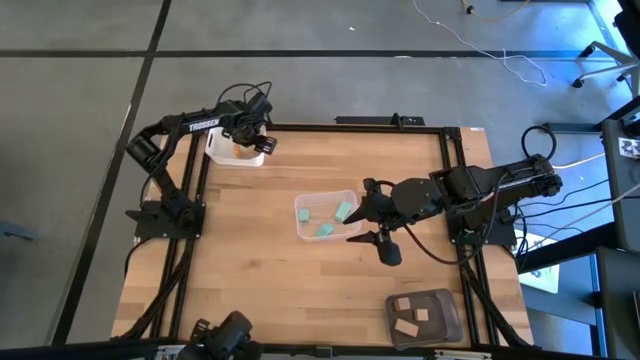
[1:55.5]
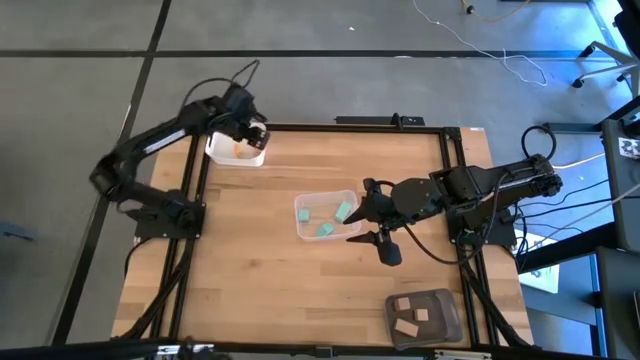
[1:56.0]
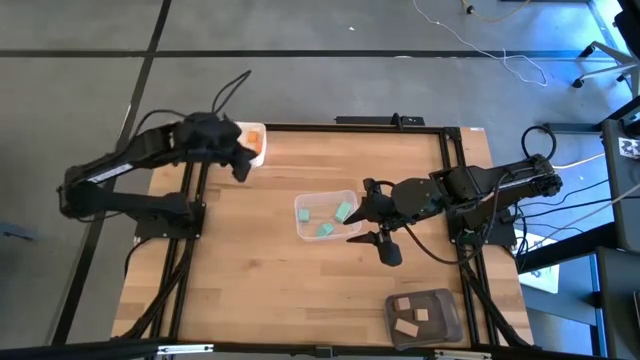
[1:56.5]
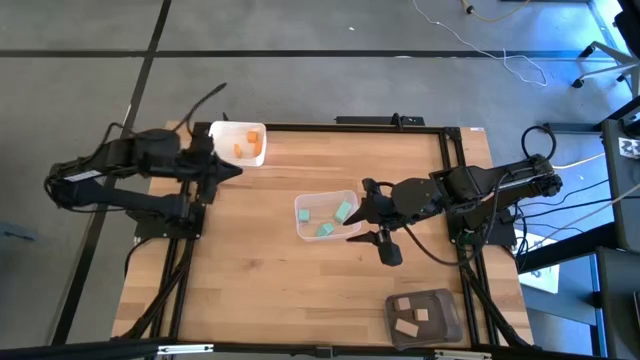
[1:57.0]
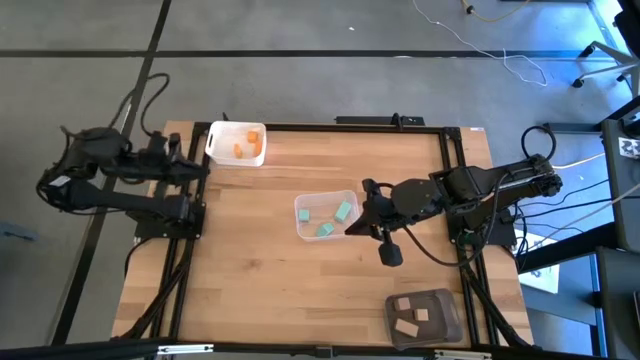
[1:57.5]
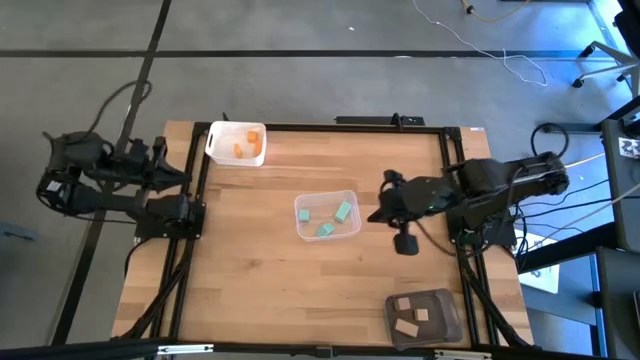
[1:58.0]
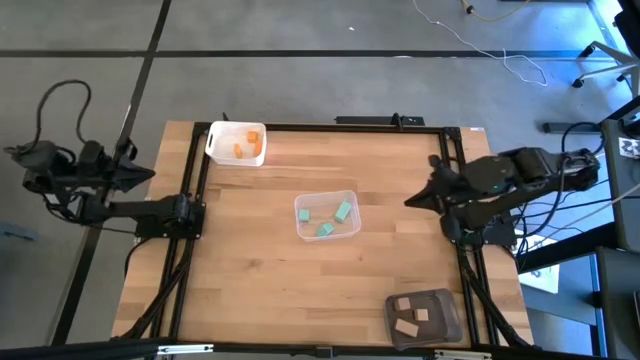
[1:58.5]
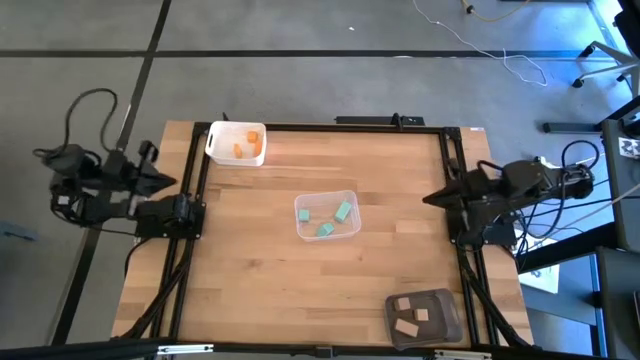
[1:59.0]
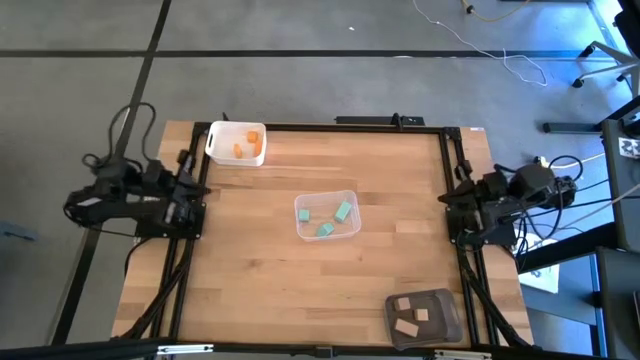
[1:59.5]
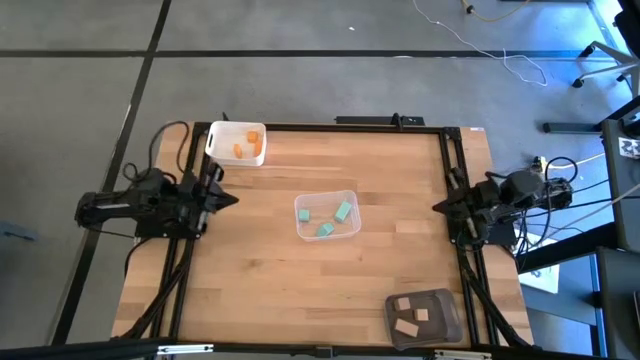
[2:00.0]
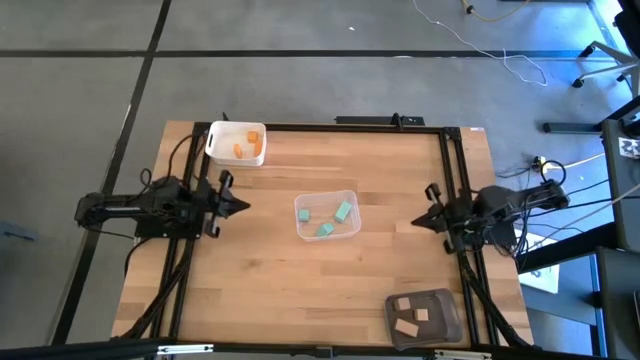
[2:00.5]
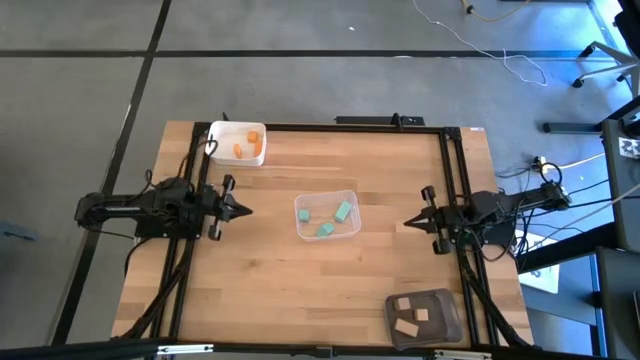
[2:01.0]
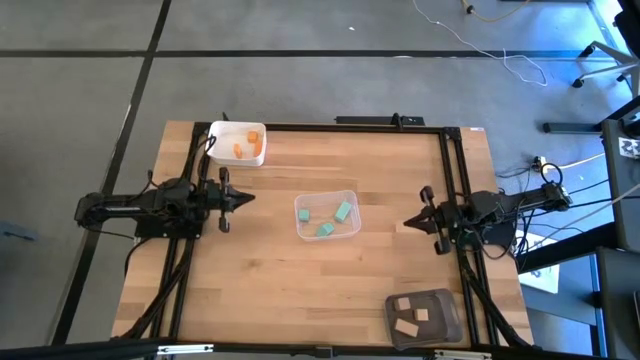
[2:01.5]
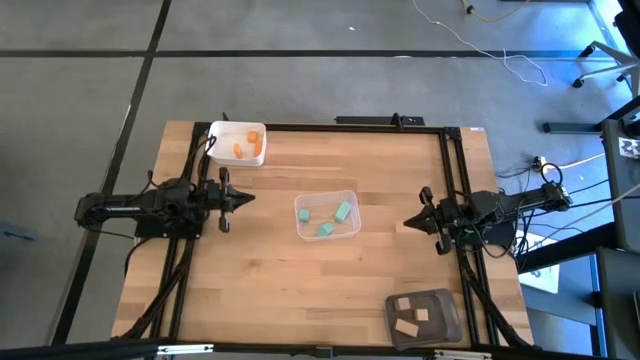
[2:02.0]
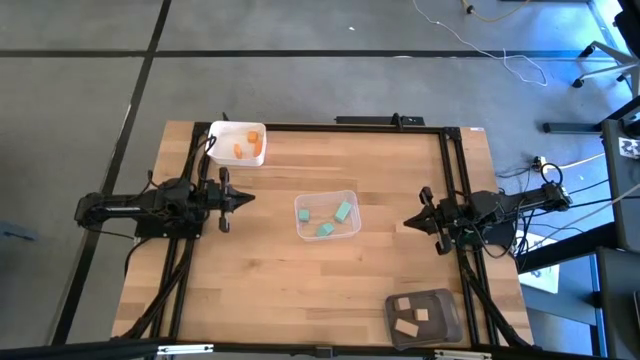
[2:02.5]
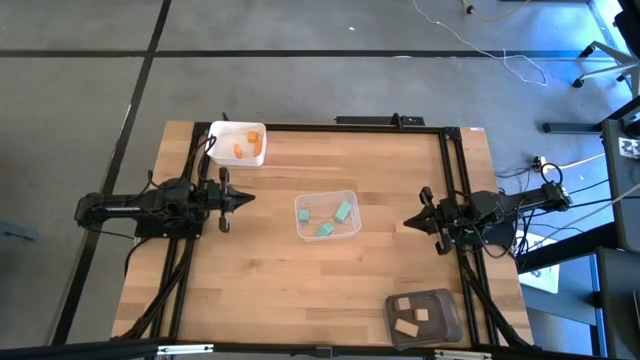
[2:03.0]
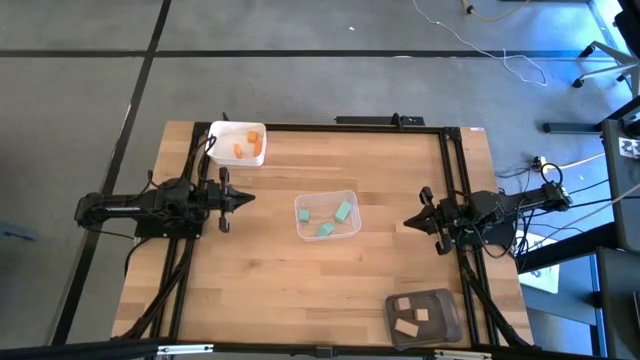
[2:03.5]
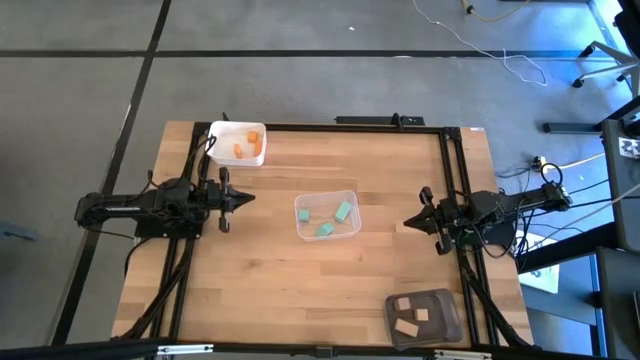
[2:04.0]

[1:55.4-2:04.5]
Task: Sort & place blocks by color
Return to Home Position

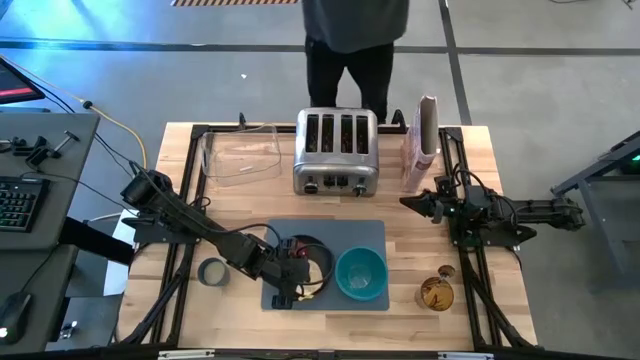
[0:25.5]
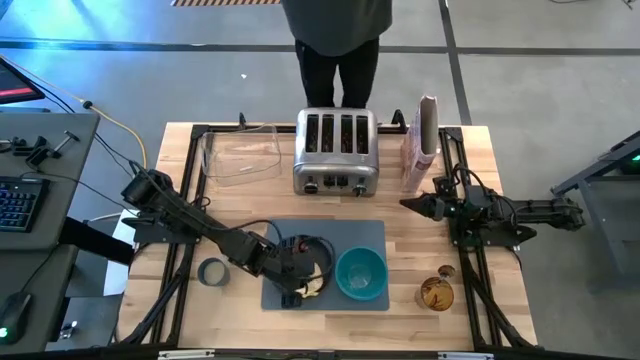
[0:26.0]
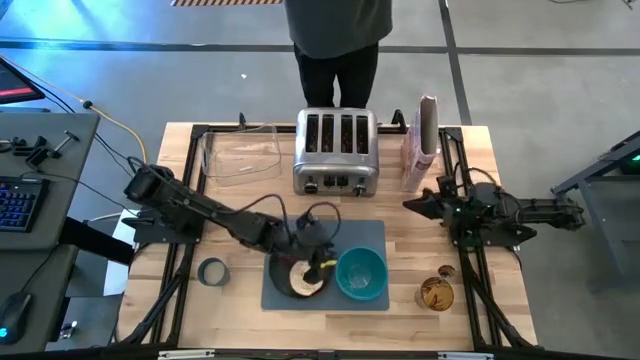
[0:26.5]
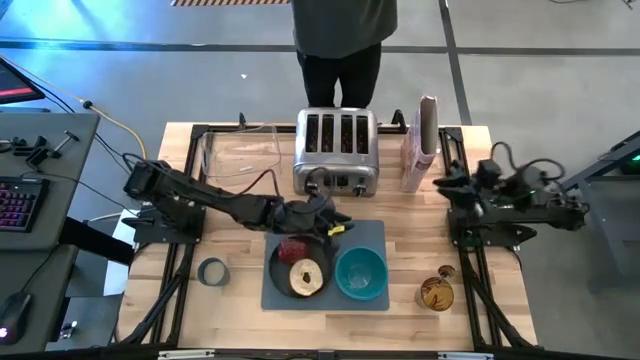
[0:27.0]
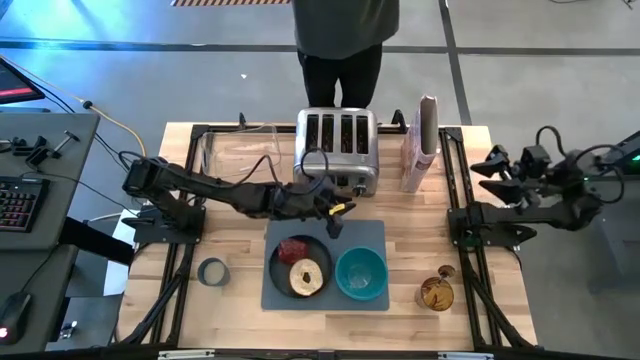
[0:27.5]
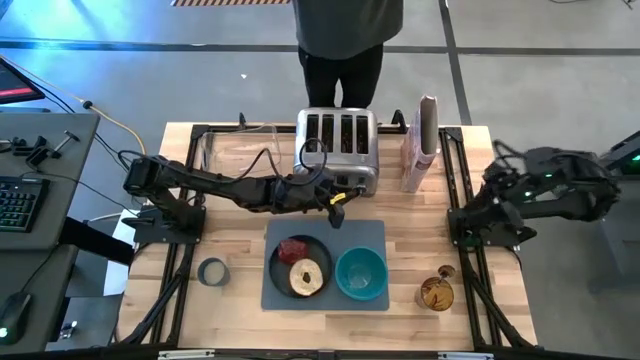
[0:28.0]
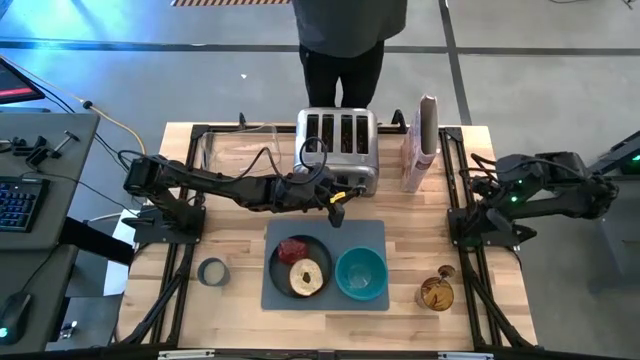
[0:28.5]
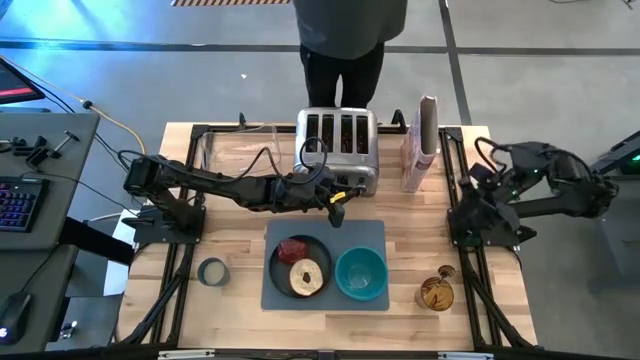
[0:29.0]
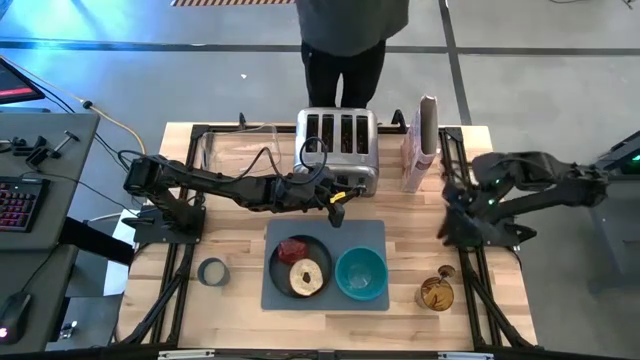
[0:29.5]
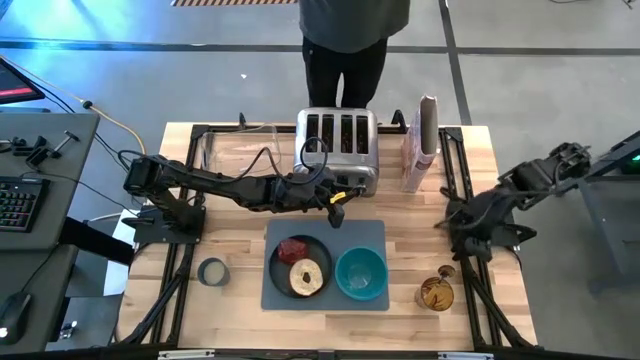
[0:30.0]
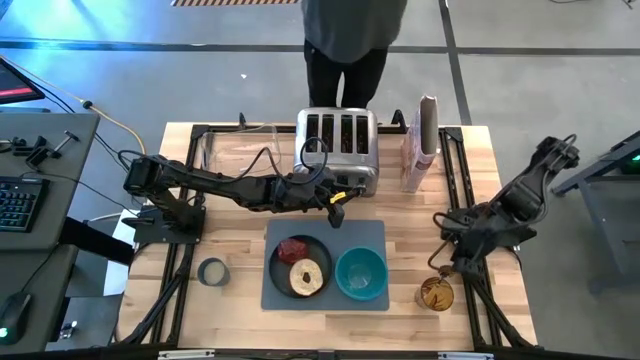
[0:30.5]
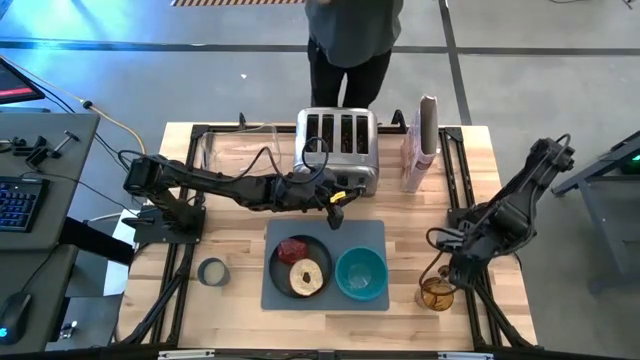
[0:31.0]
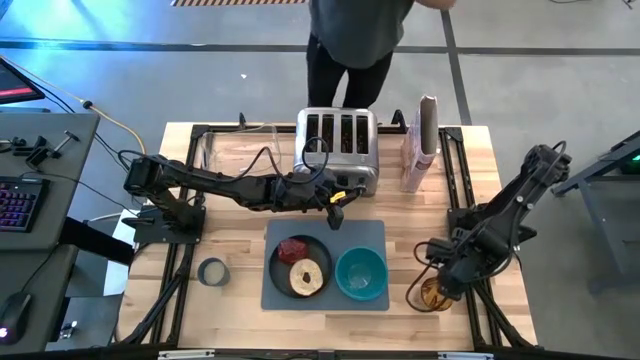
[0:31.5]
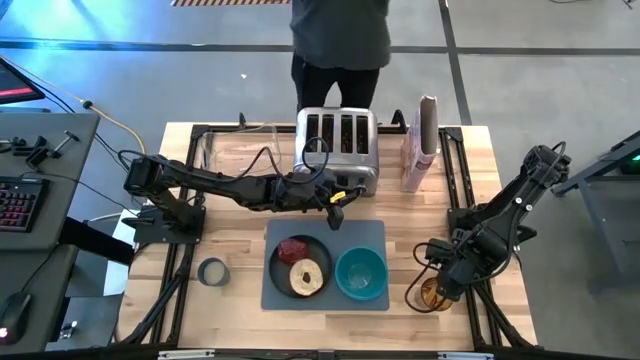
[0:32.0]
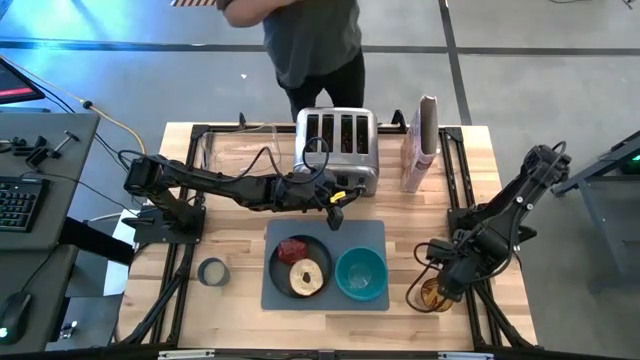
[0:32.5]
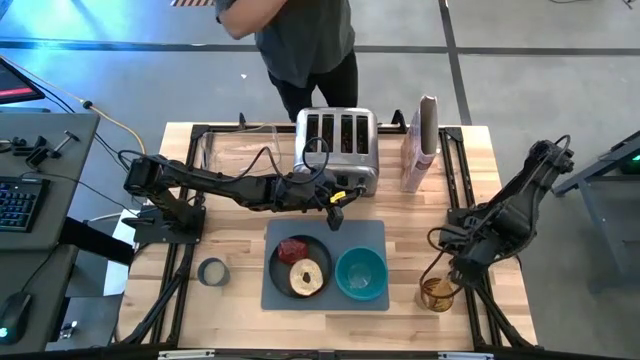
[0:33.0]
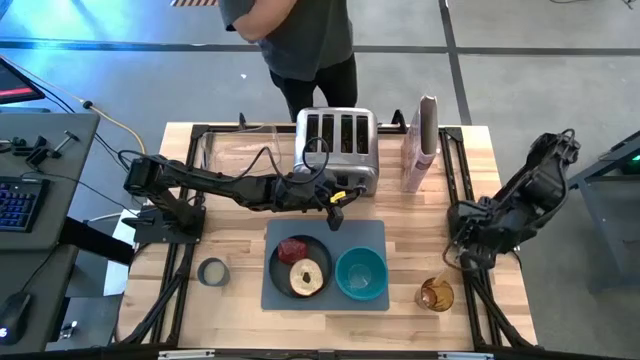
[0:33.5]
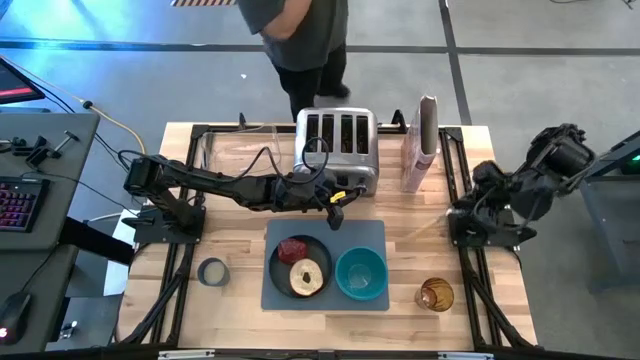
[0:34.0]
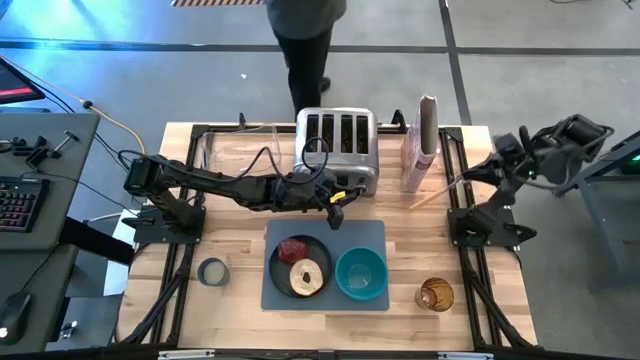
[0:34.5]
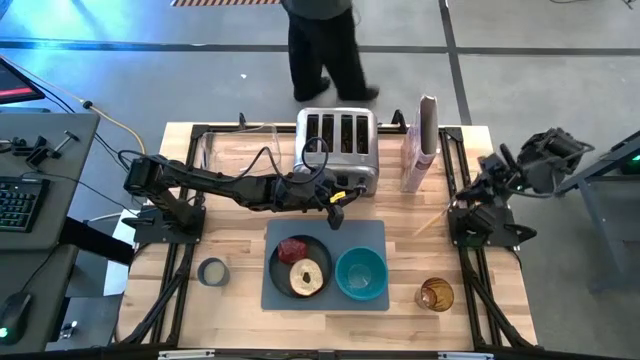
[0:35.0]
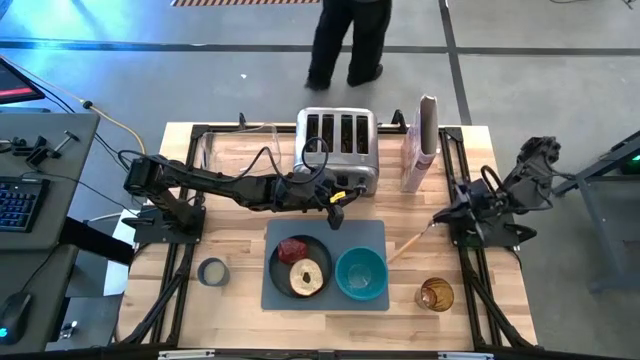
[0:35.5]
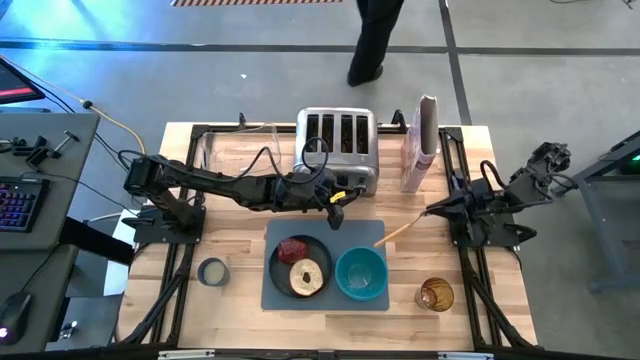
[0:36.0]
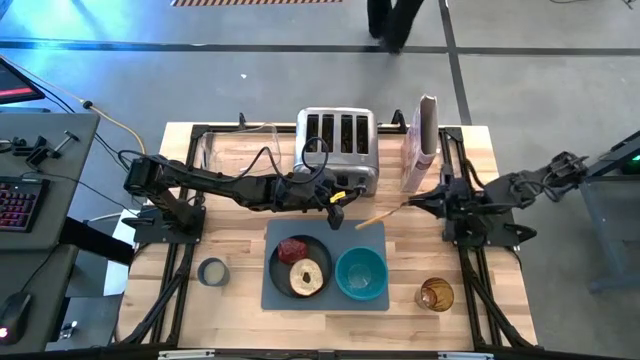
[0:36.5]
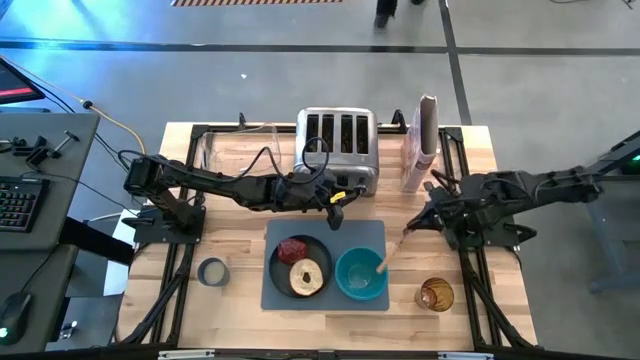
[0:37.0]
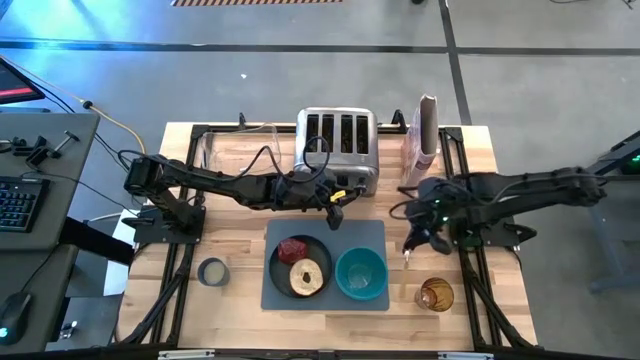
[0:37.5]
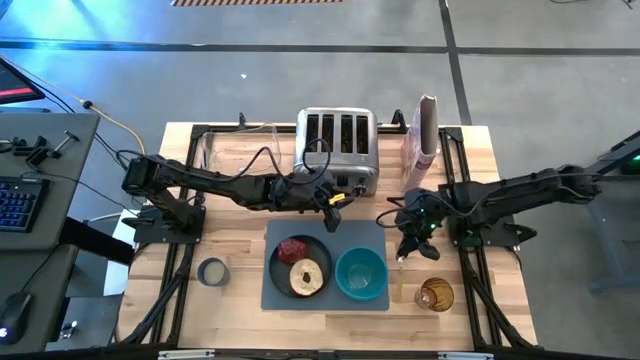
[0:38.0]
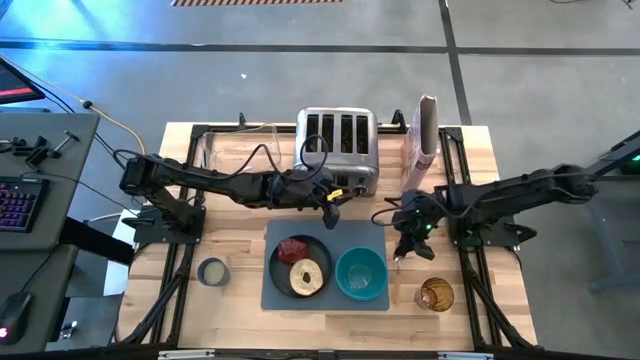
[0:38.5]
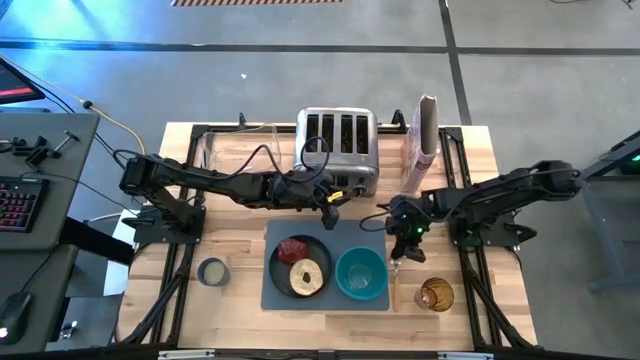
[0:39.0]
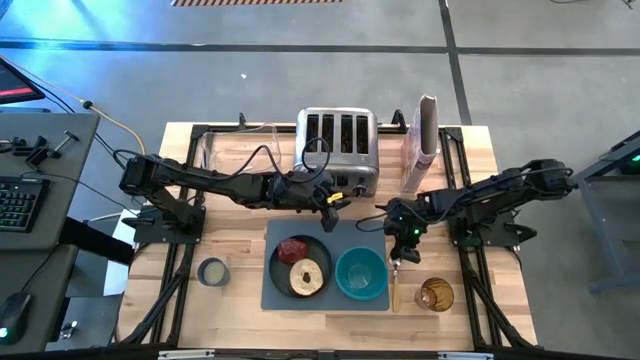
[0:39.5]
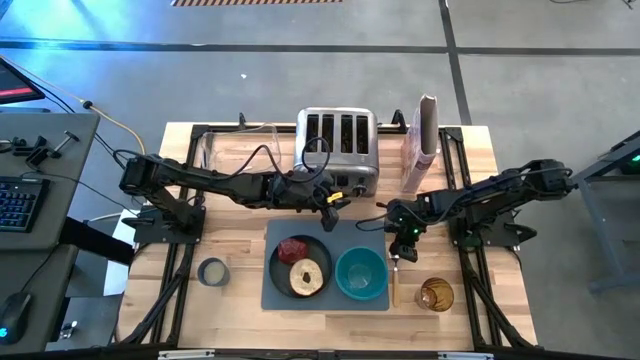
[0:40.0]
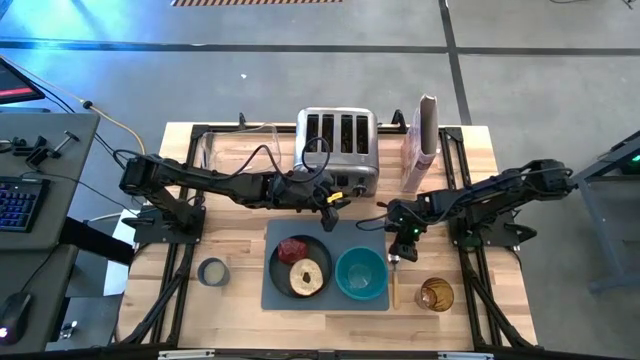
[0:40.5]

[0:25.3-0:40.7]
Task: Arrange a breakfast setting
Put the spoon on the table to the right of the blue bowl
